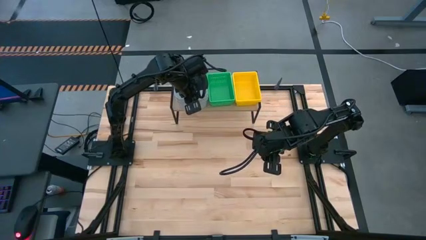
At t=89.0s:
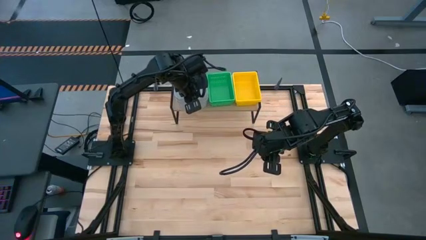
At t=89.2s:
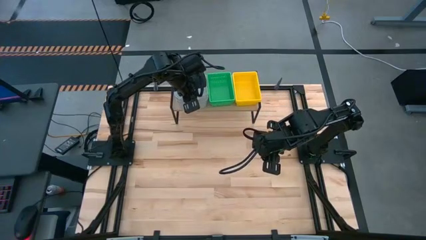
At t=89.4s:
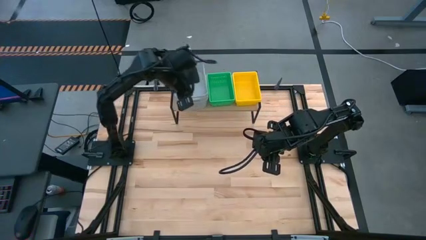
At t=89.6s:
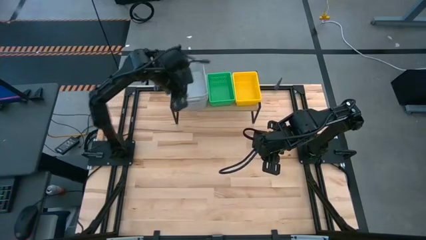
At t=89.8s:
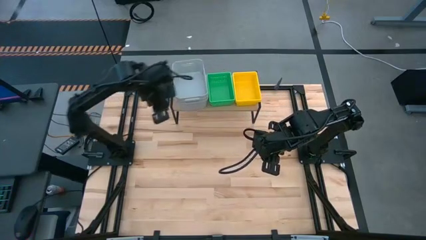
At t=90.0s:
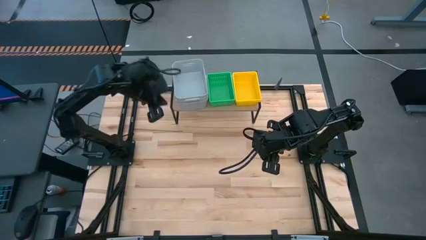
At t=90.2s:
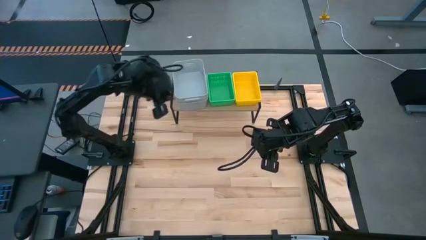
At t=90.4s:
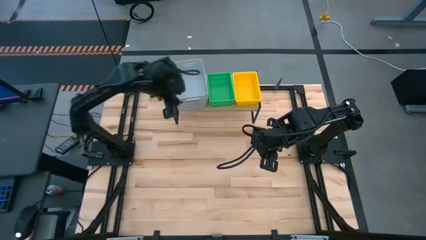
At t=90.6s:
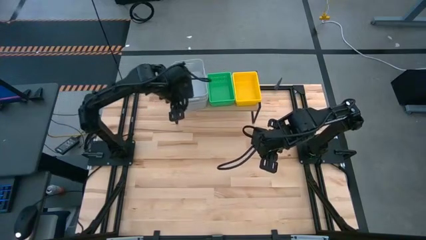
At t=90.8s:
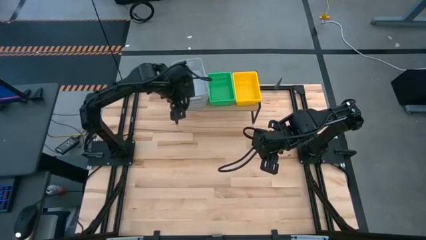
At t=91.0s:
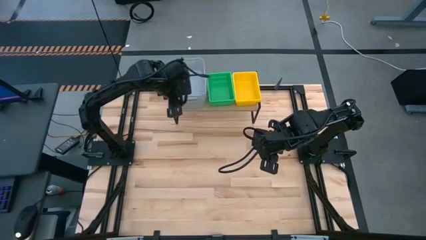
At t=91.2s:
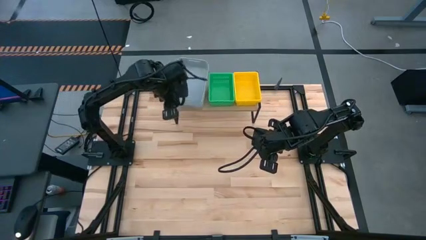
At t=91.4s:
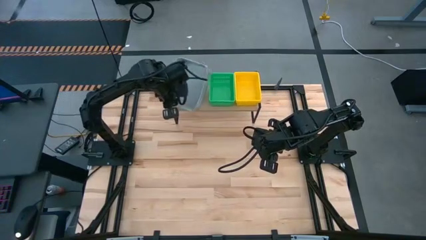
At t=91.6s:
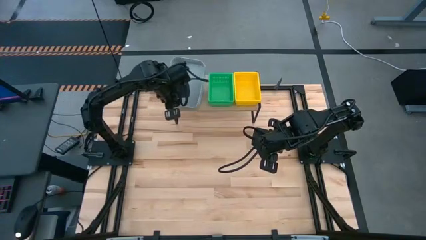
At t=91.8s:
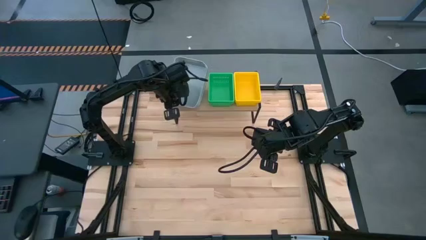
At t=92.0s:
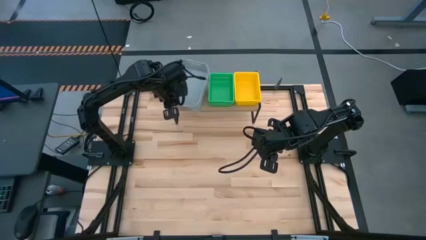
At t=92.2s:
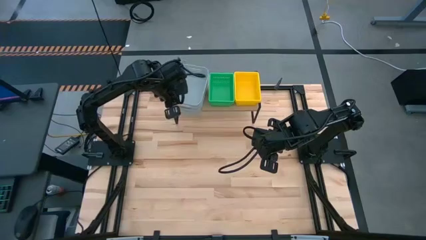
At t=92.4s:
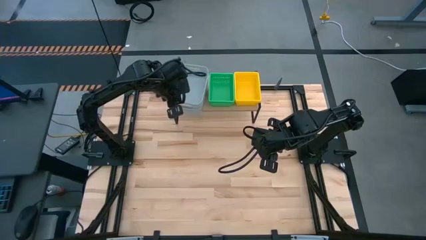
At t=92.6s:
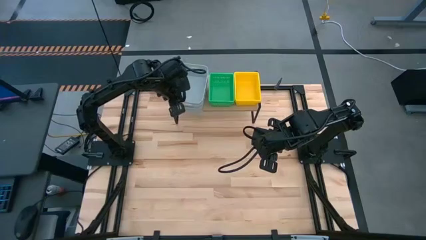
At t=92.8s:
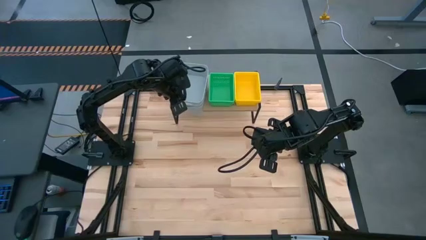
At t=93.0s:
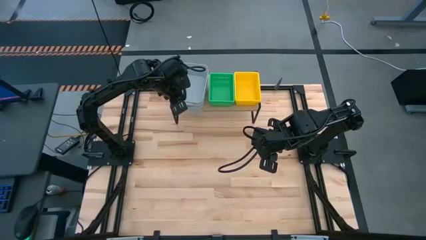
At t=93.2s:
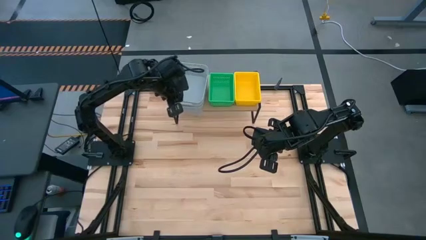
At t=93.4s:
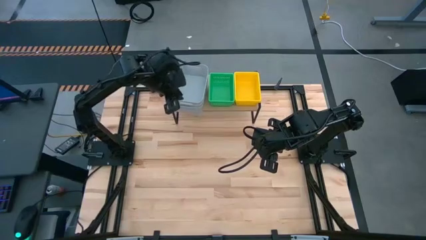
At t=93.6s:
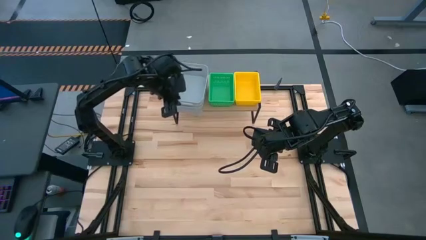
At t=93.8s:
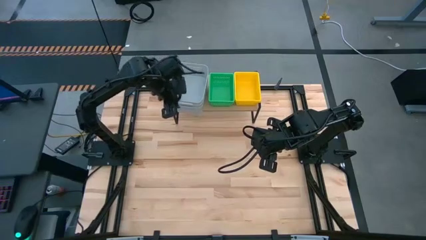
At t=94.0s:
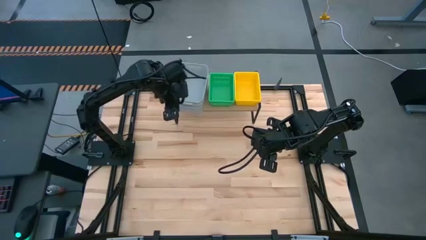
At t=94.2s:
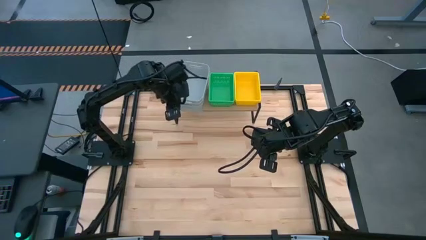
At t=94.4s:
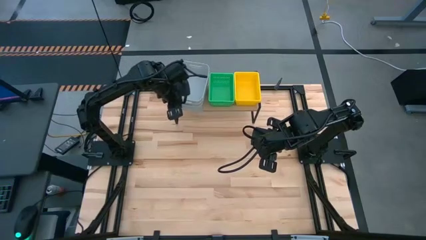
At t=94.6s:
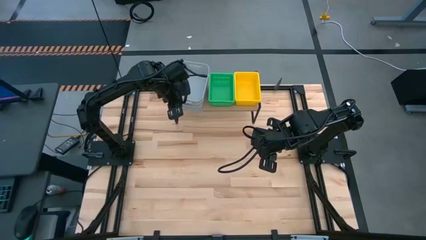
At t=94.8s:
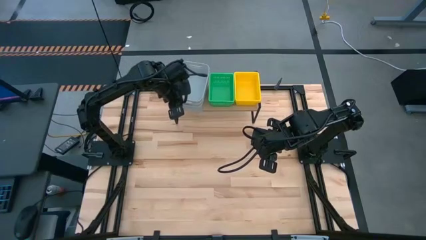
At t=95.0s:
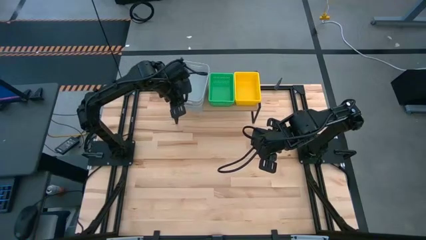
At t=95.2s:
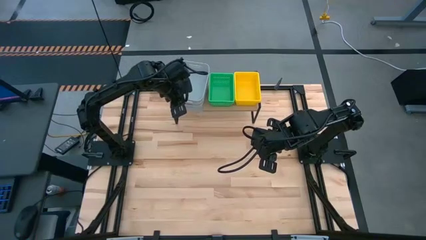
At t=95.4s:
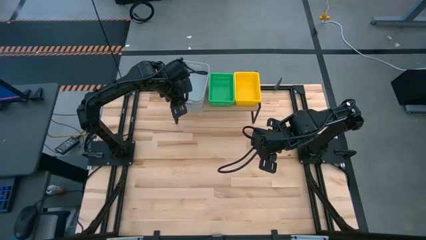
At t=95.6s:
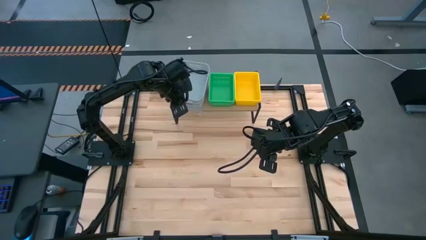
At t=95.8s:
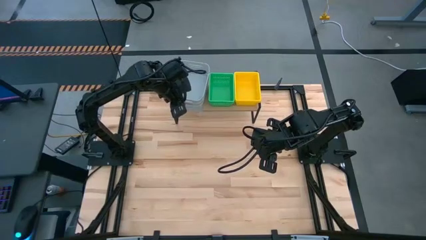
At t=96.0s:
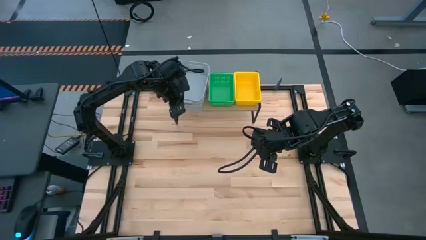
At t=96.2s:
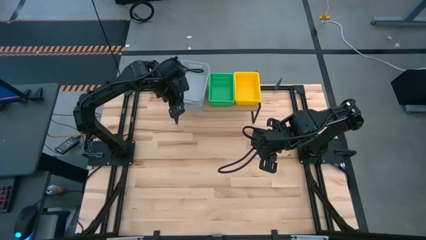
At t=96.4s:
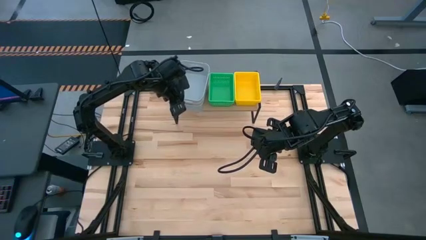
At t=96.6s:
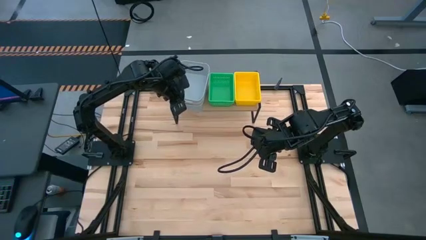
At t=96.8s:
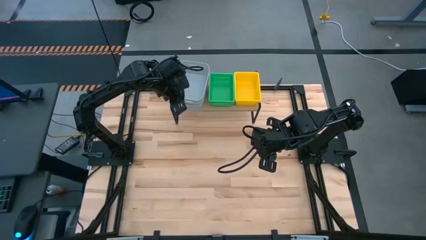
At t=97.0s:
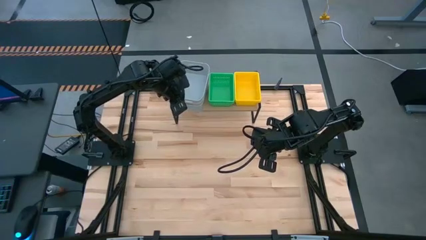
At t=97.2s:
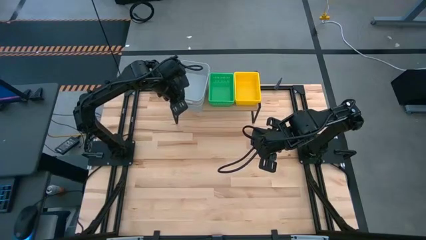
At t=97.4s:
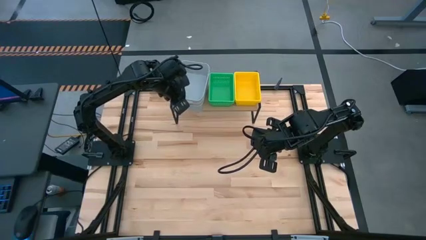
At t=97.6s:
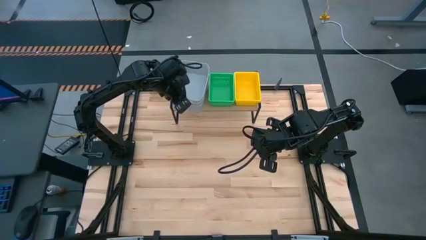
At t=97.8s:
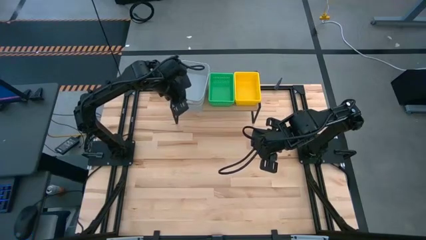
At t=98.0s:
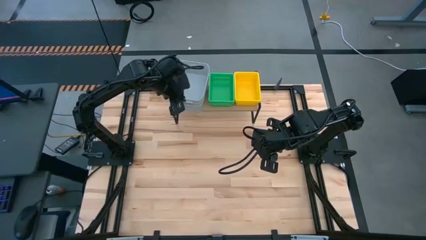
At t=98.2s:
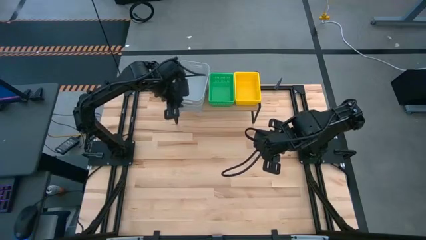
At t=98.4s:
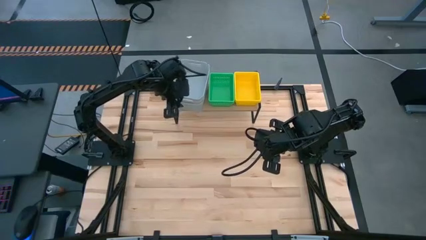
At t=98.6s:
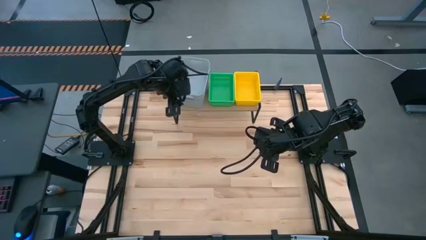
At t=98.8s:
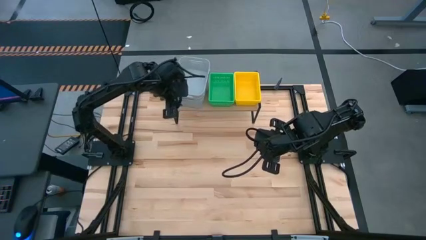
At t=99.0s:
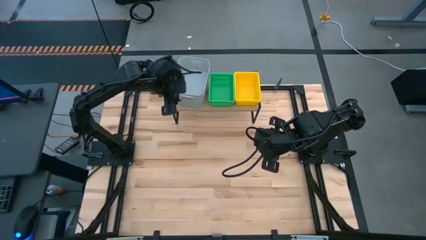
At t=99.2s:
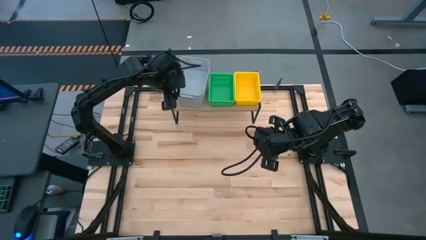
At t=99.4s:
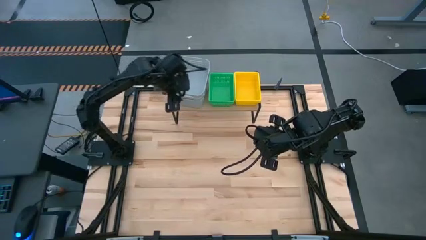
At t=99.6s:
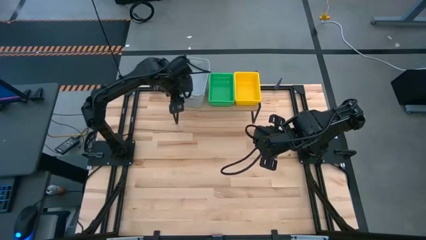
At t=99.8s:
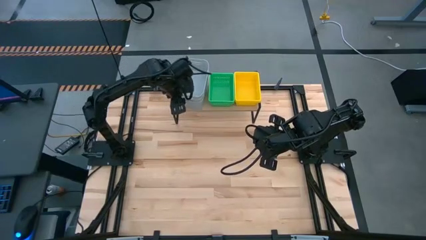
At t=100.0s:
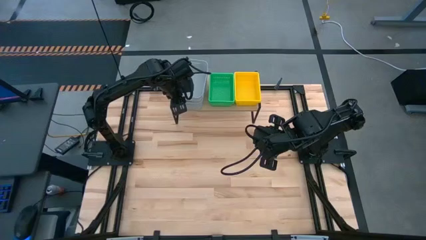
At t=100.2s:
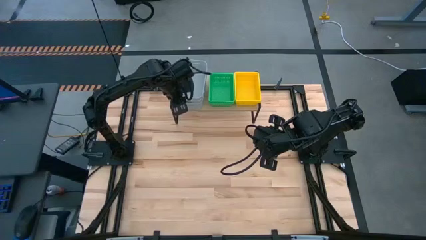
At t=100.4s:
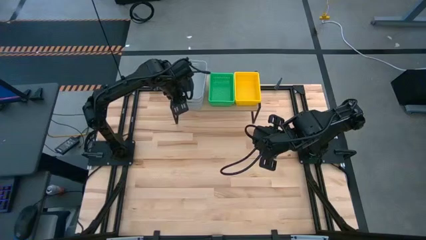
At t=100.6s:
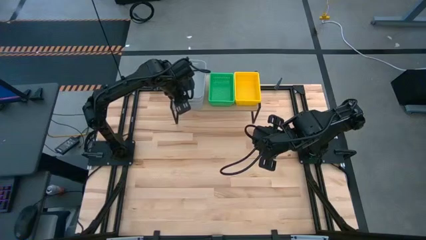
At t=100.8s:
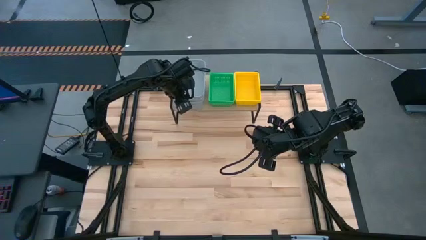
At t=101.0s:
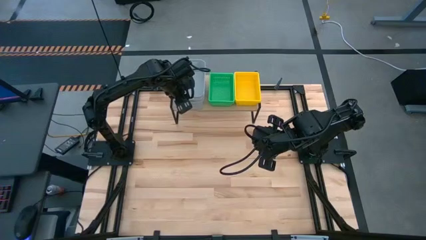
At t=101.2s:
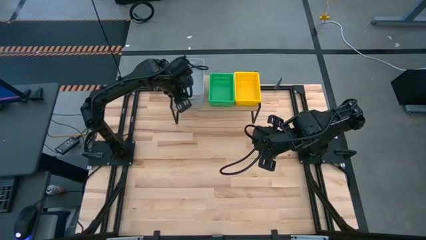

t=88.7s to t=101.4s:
Task: Stack baskets on shelf by color
Stack the gray bin on top of the gray bin on the shelf

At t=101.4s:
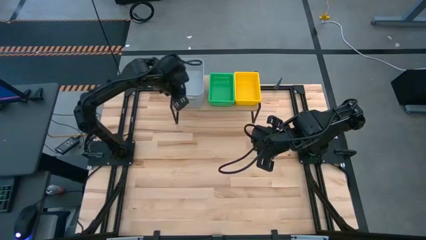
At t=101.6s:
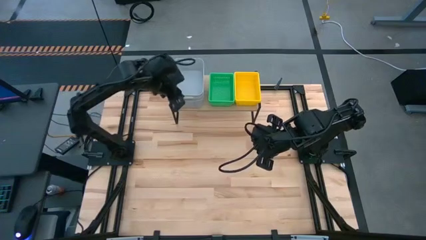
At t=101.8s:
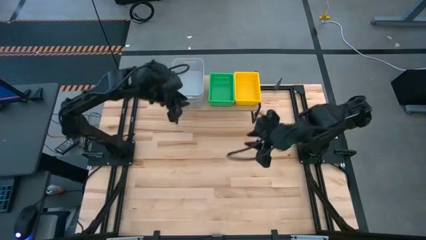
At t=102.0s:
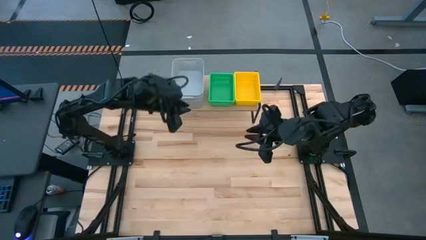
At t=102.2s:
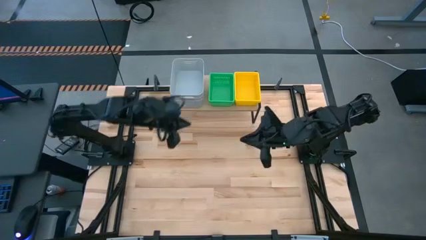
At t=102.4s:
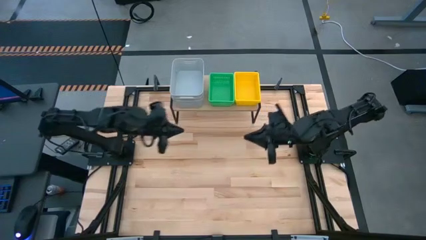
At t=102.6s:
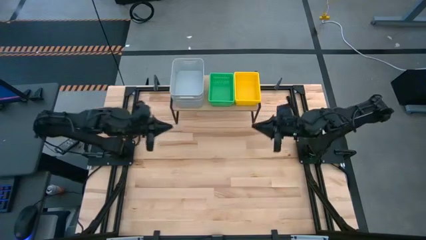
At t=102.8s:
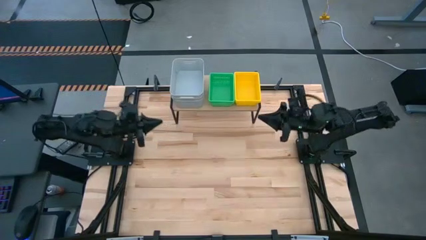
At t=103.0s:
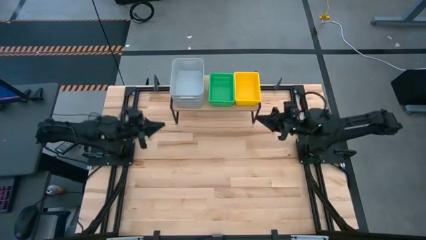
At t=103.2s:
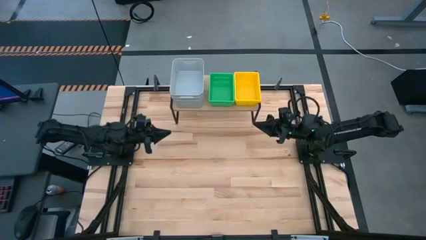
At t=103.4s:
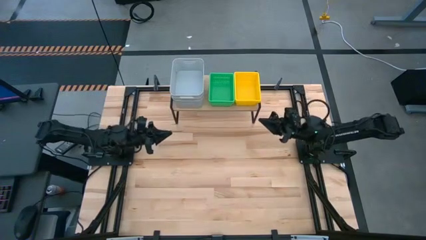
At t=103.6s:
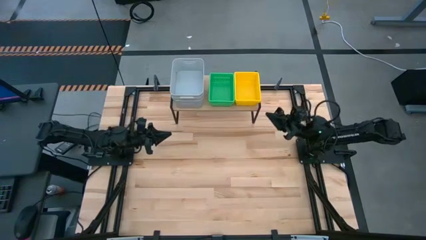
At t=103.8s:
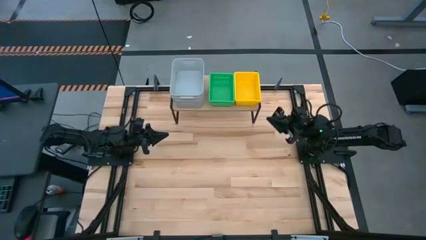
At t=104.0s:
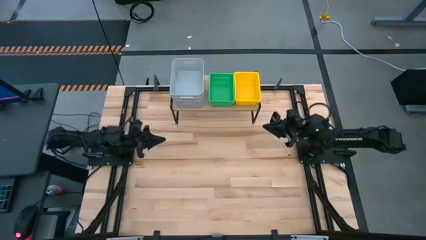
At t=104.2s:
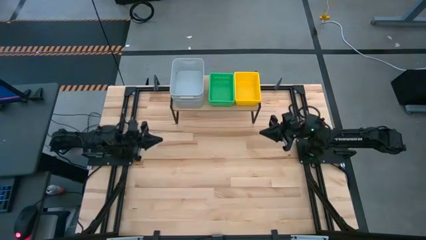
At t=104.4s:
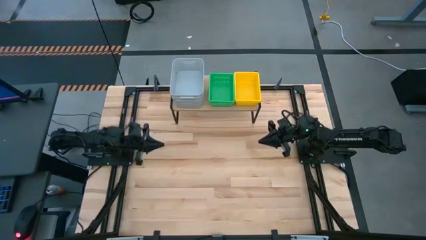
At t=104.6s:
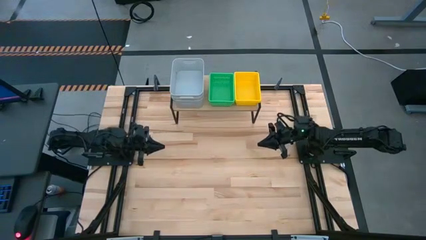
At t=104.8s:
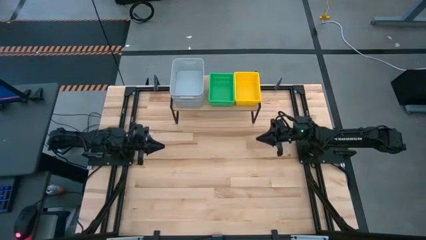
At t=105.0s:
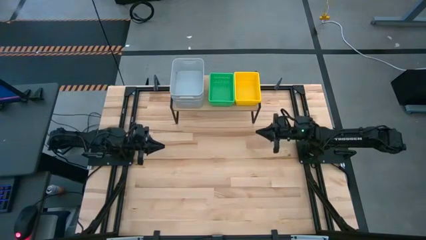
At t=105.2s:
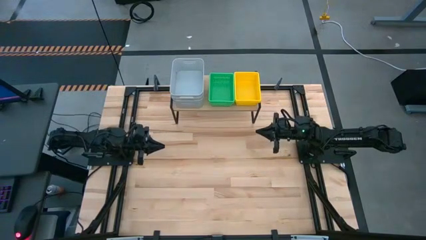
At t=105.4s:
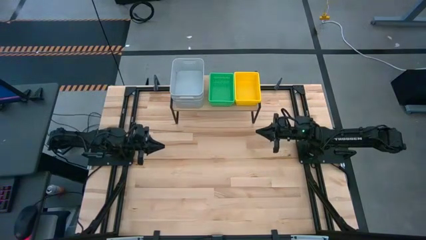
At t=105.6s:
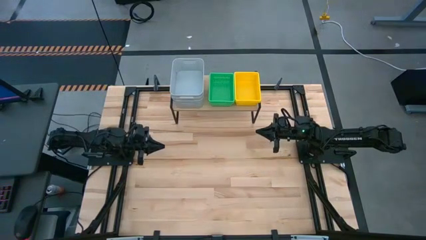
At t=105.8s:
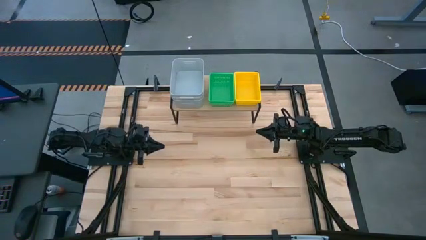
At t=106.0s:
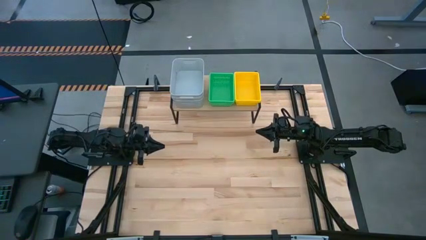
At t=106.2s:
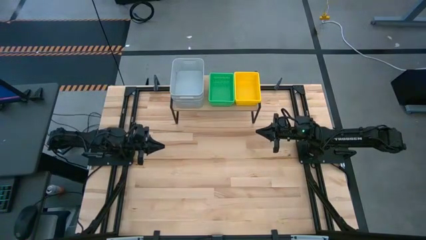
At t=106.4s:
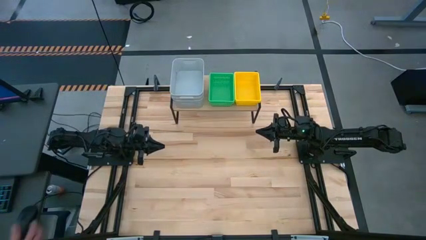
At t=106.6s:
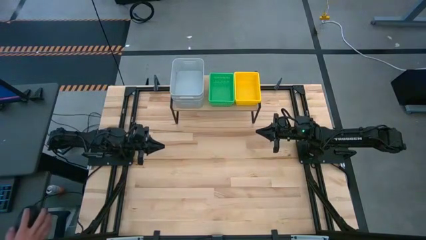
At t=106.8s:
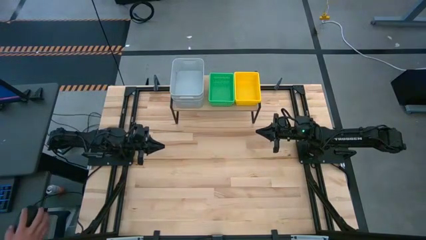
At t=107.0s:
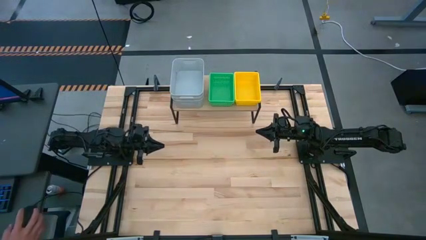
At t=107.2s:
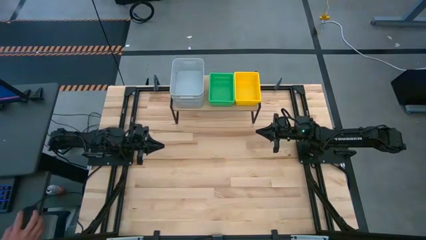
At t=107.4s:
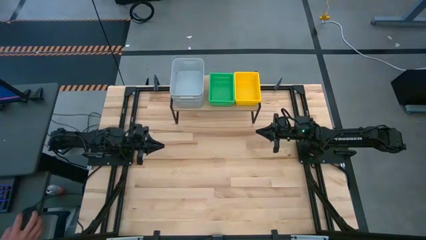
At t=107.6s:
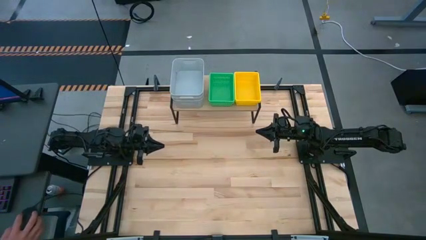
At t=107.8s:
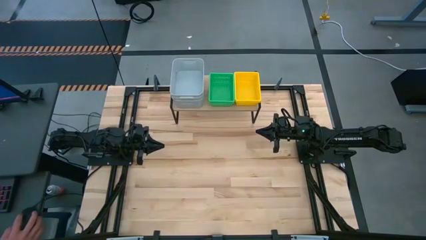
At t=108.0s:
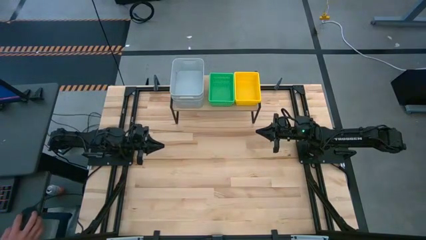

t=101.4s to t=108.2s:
Return to Home Position
